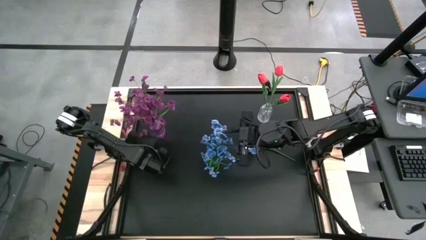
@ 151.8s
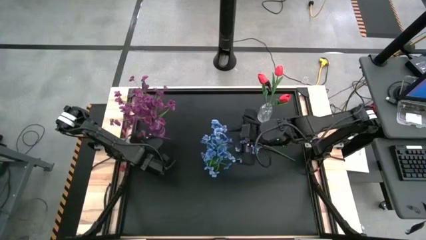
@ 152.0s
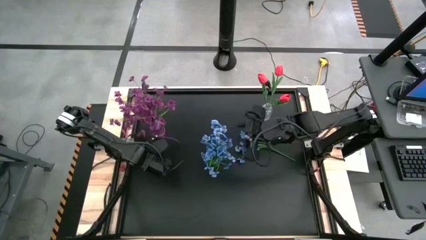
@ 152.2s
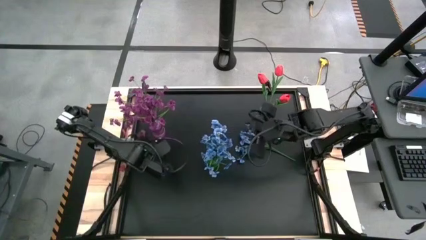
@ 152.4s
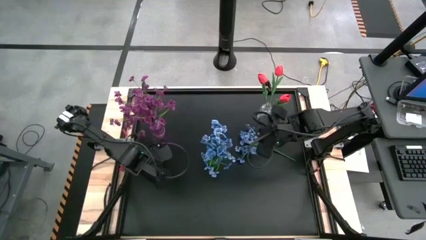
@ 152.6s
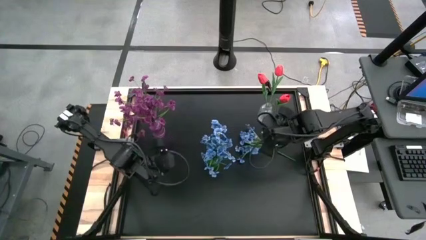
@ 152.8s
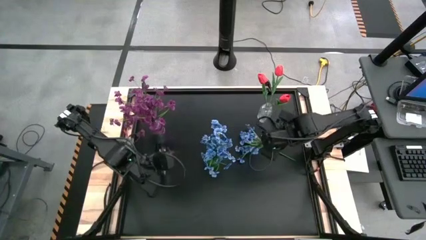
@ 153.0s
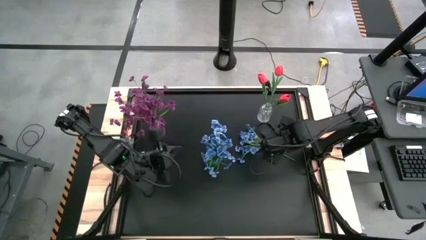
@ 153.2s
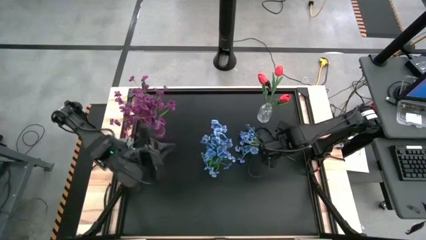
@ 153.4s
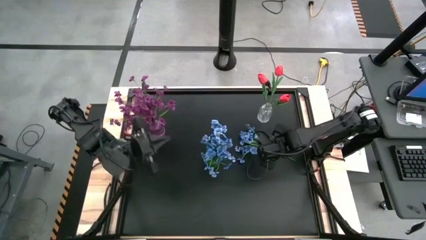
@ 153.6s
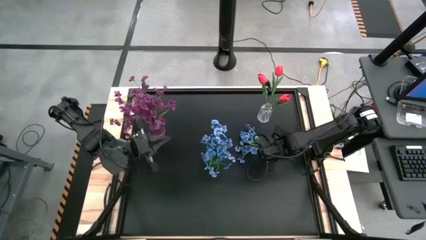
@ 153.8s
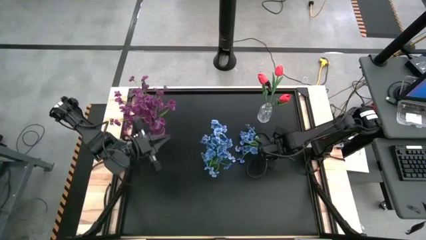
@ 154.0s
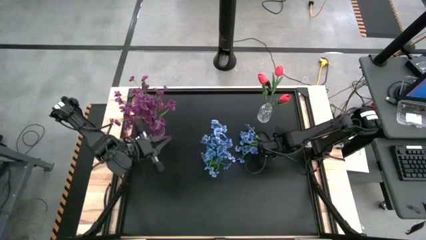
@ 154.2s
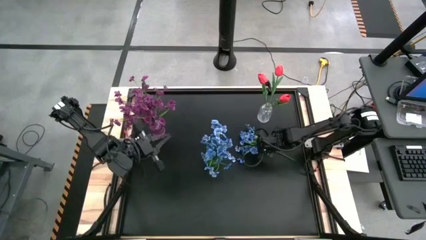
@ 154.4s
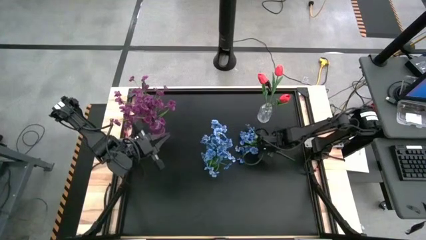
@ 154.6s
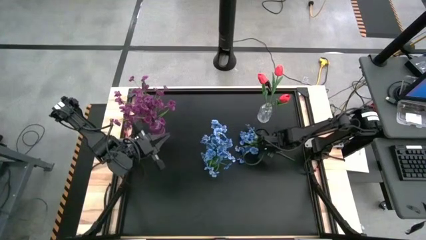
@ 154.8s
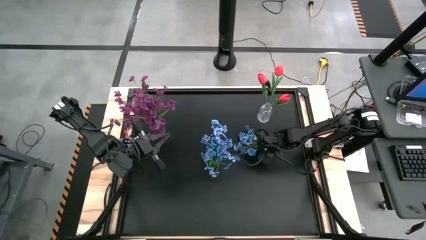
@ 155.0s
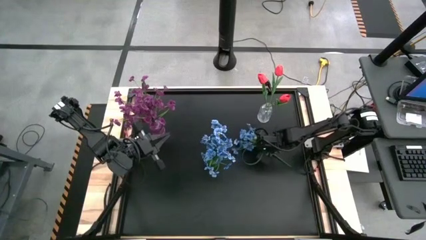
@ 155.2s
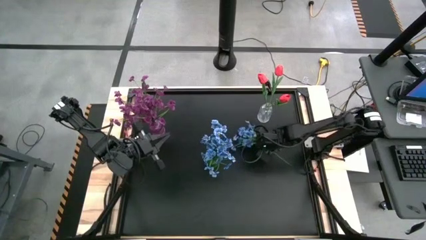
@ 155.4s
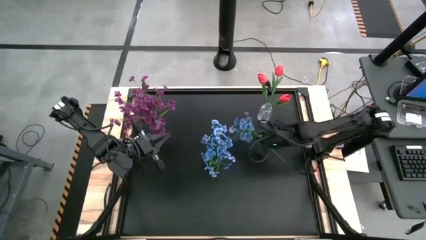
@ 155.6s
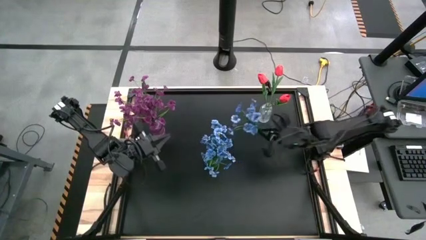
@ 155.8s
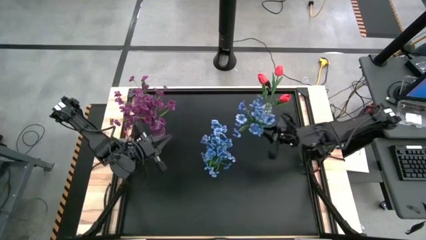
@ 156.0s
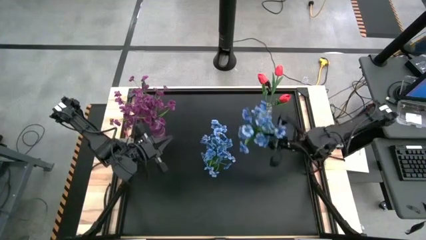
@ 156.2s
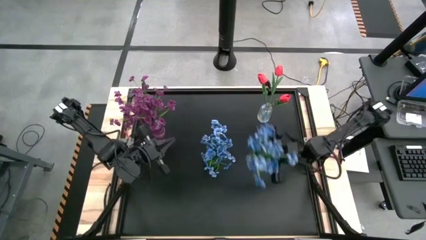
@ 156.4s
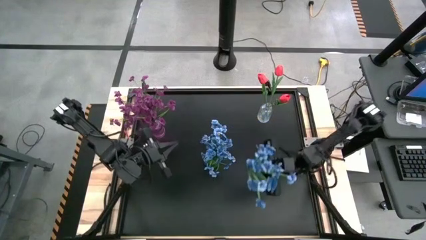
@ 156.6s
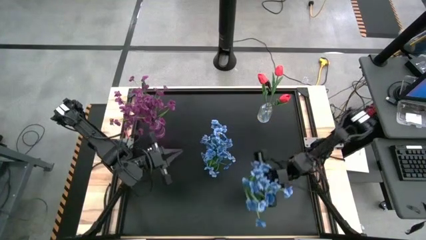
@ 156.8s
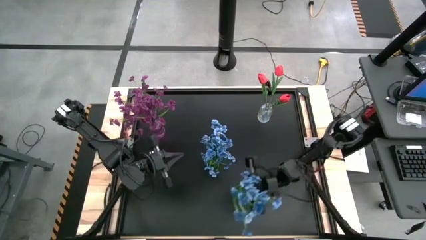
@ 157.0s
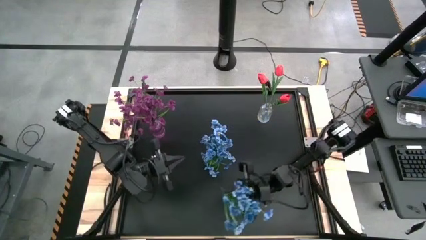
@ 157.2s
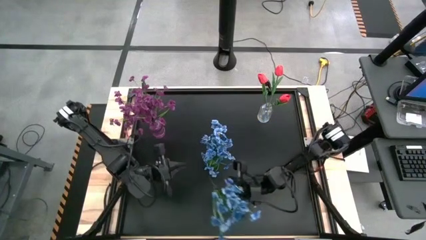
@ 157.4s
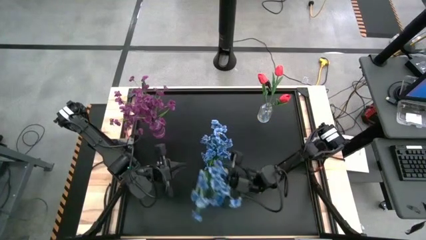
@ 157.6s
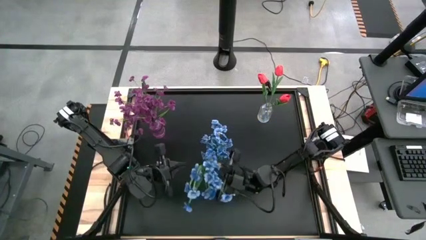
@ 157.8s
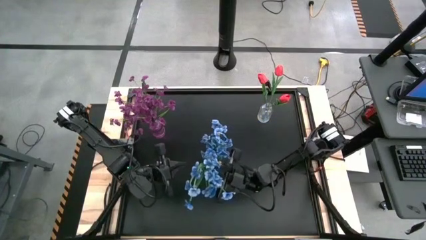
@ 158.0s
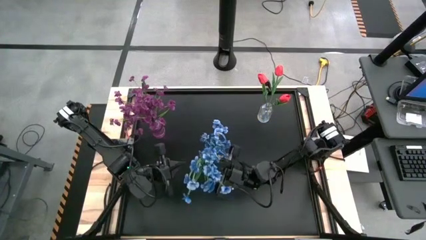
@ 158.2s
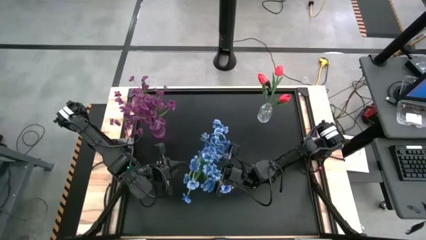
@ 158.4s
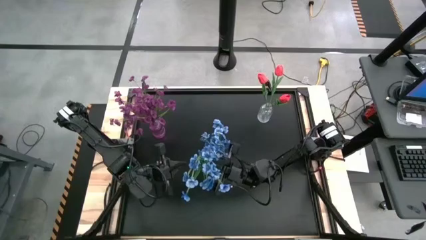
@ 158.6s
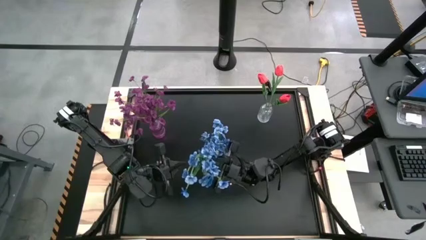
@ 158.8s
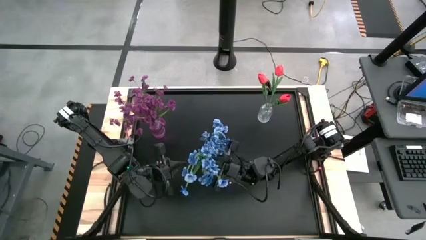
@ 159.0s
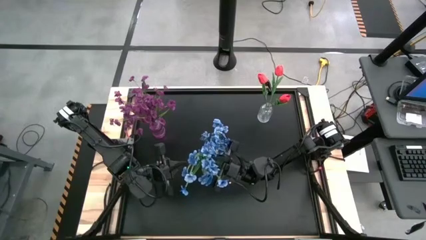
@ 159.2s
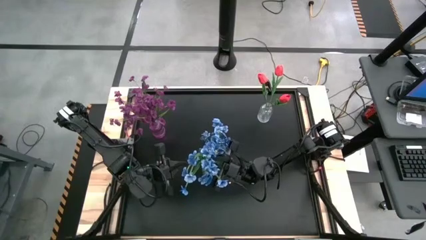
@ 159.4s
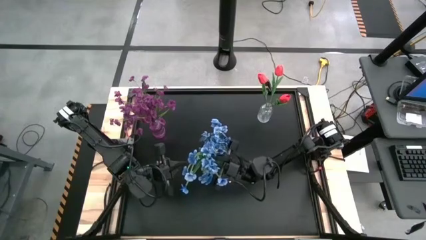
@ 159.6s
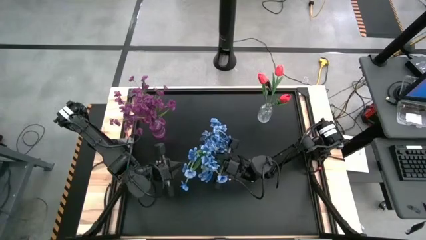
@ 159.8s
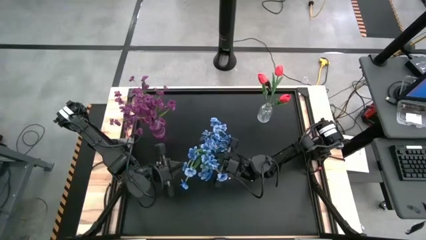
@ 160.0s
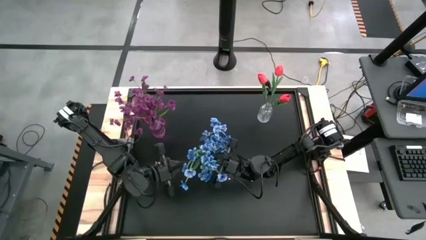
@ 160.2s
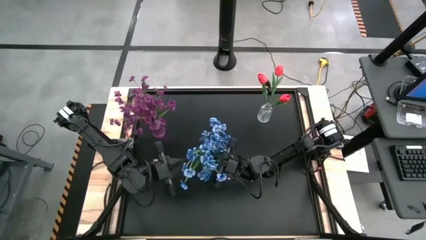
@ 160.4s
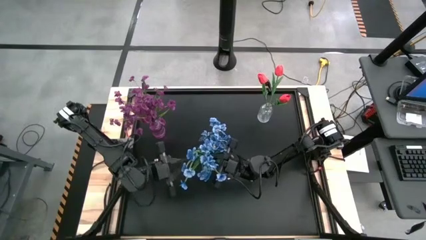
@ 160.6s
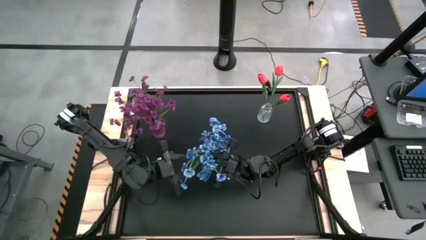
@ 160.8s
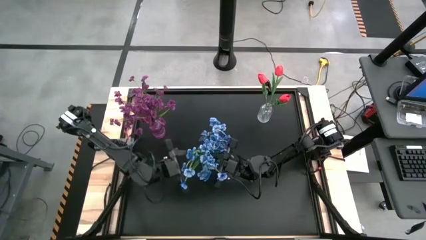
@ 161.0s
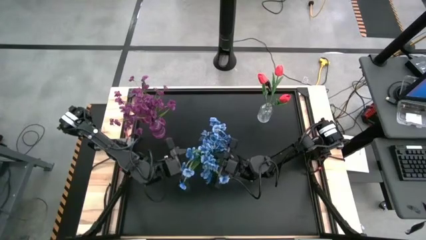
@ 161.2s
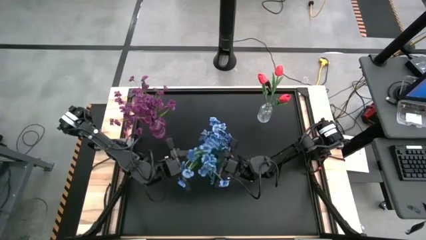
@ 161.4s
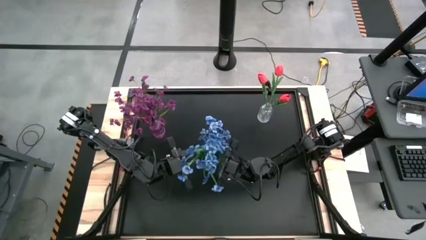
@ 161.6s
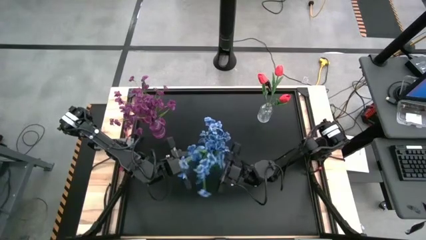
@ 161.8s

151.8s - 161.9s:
Task: Sort flowers into vase by color
Put the blue flower into the green crystal vase

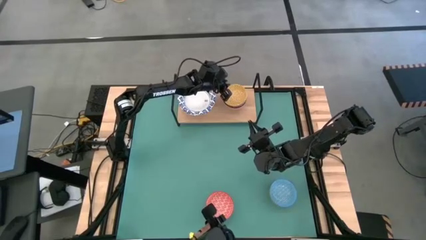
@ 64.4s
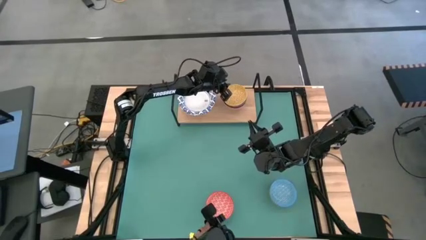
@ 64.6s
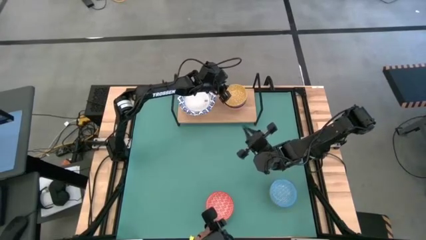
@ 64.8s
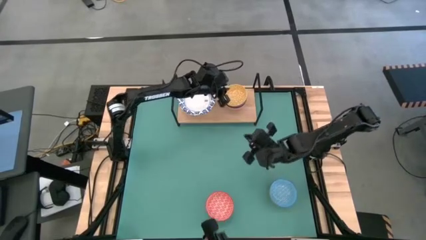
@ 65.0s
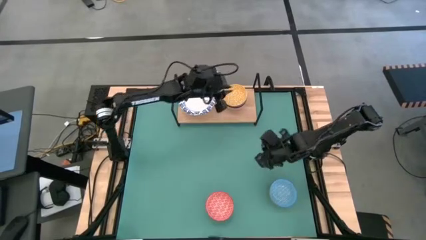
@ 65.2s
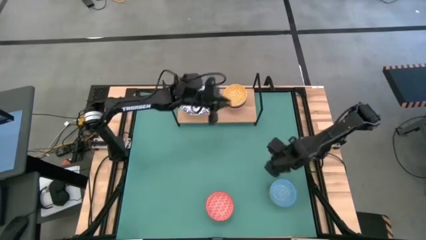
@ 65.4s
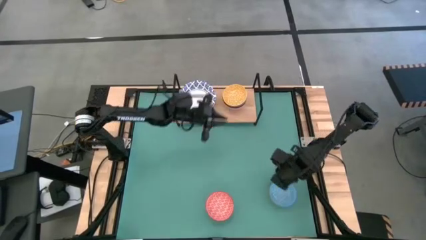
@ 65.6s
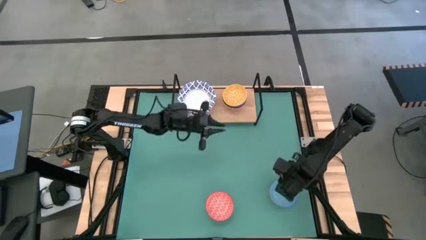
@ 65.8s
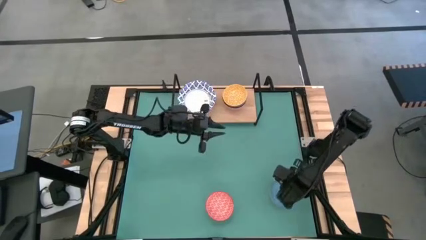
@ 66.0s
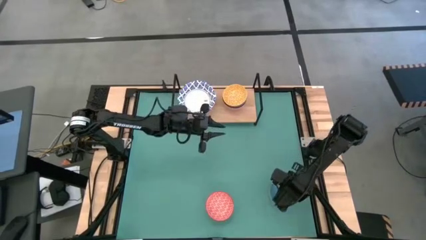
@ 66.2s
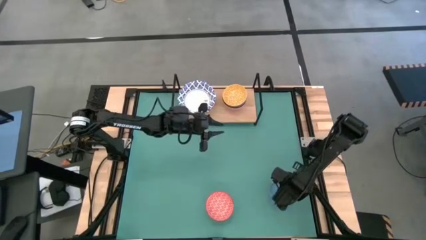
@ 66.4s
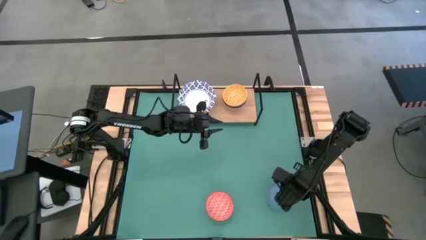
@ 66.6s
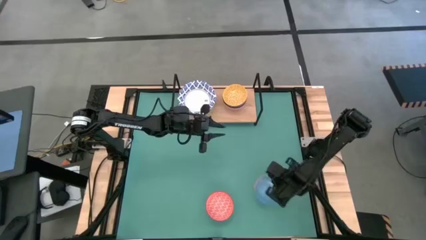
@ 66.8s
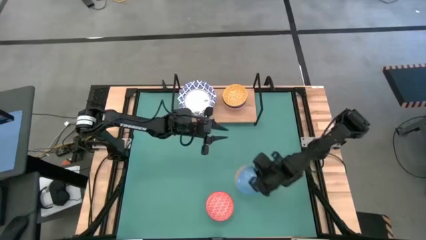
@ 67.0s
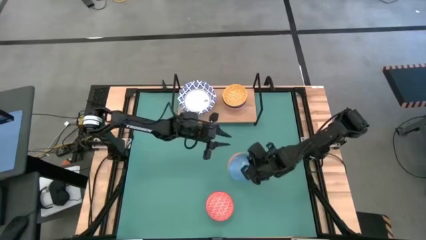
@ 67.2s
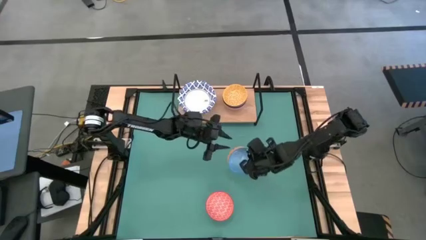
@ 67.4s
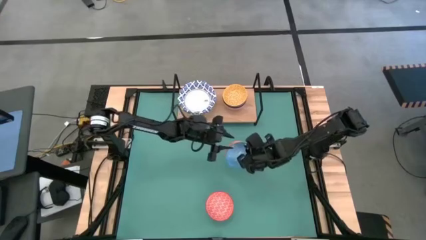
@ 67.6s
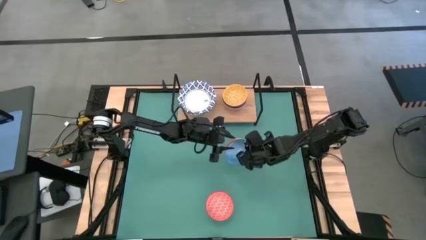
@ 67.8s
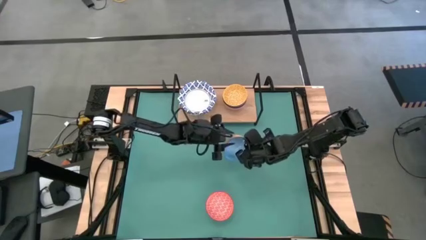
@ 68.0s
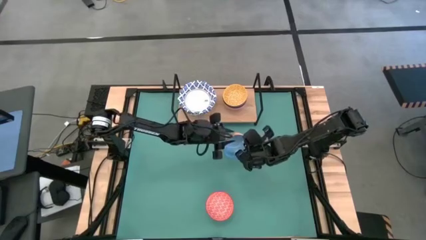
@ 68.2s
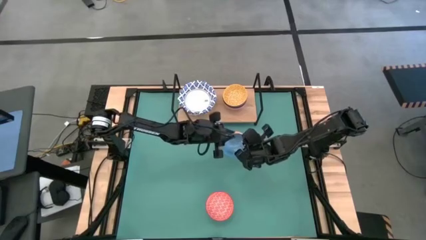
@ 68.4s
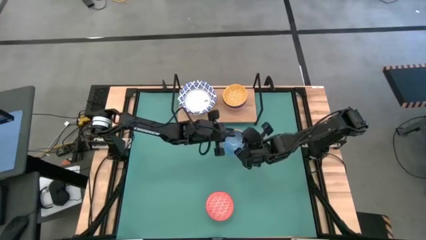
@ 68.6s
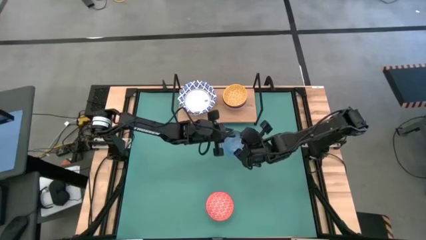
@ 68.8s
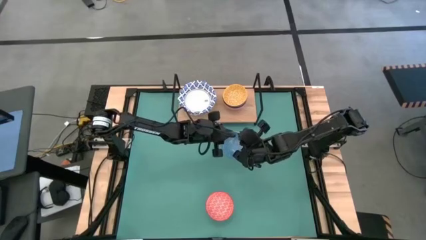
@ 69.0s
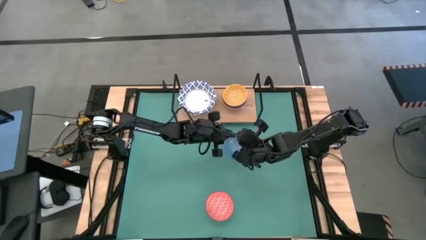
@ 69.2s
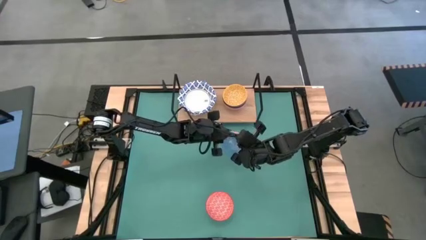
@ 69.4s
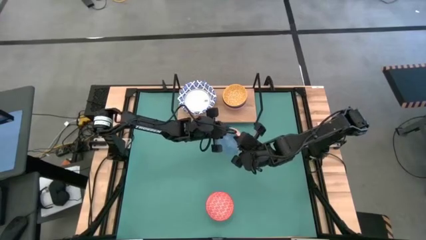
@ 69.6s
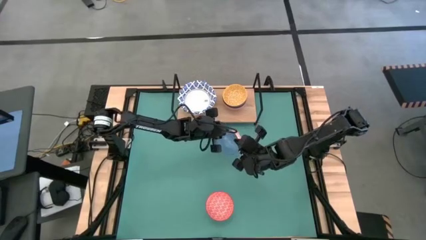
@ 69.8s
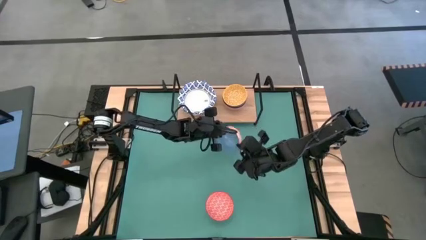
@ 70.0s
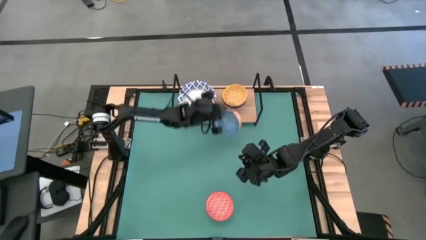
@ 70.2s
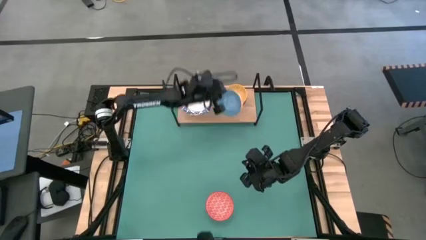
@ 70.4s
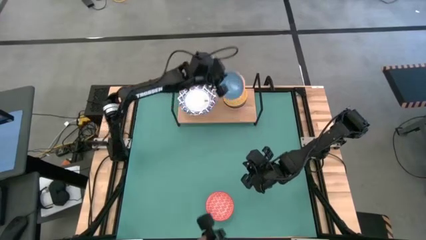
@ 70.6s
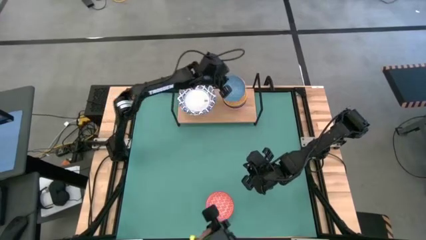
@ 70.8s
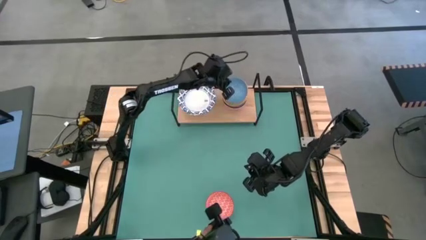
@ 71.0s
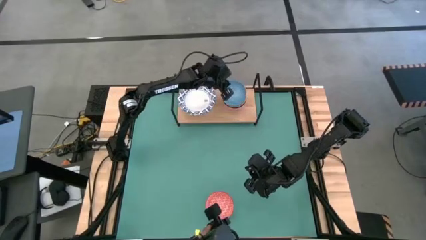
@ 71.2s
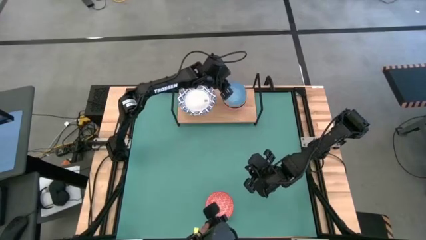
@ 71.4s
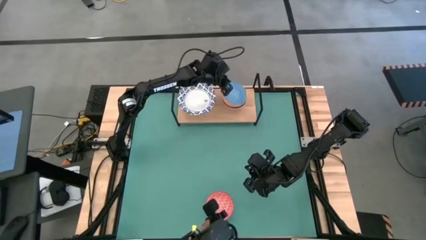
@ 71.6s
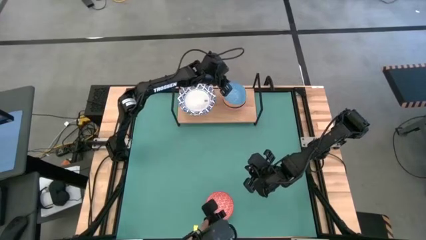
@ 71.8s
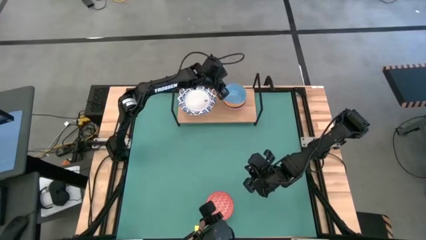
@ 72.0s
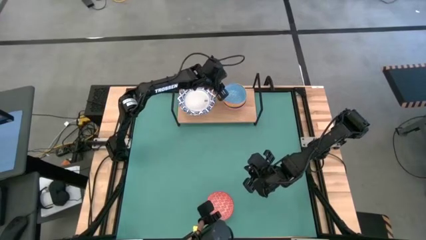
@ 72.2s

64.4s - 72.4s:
Task: Place and stack bowls onto a shelf
Stack the light blue patterned bowl on top of the yellow patterned bowl on the shelf
